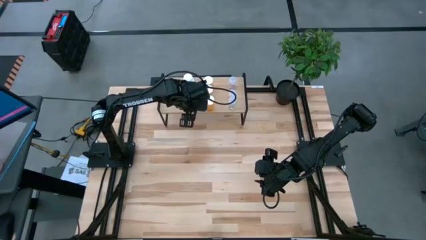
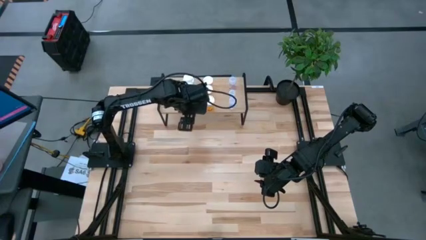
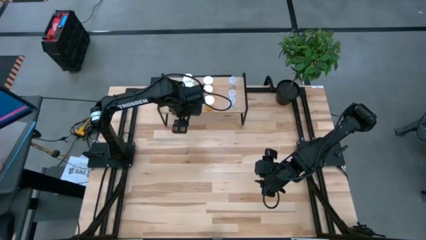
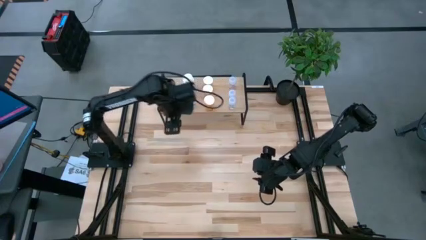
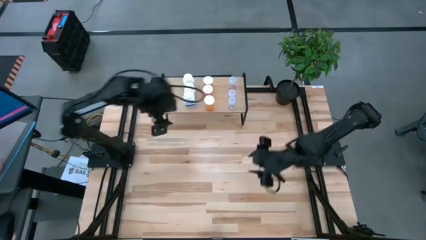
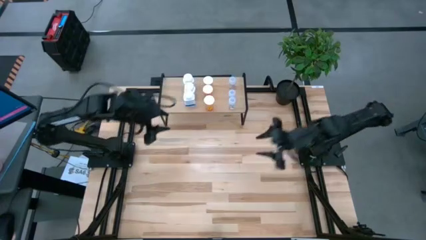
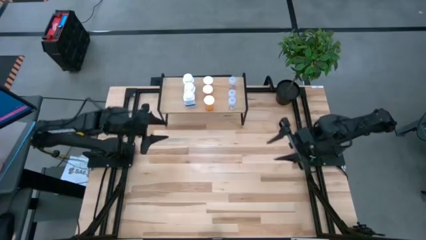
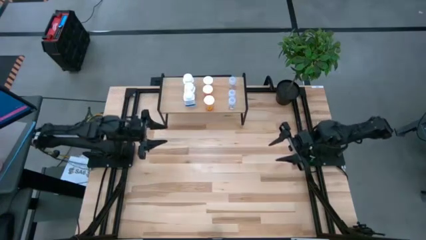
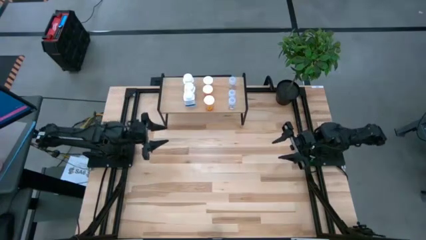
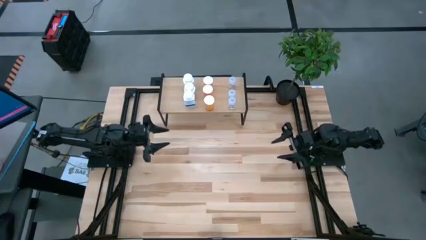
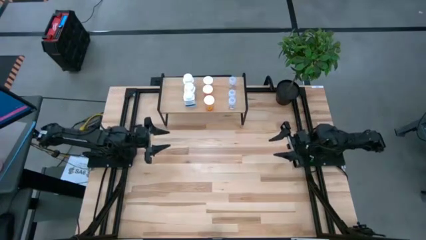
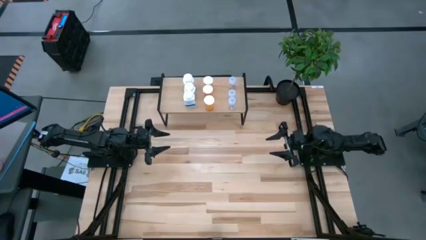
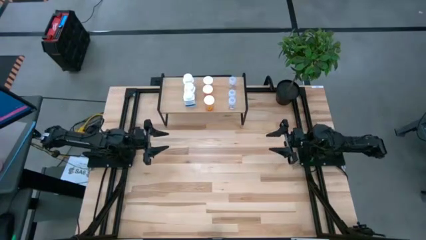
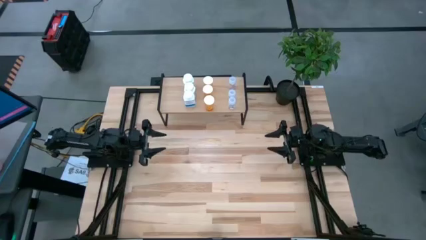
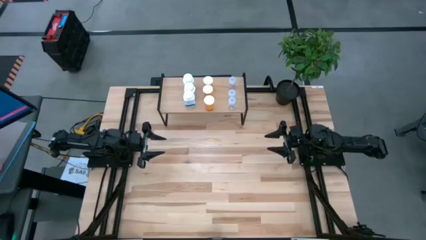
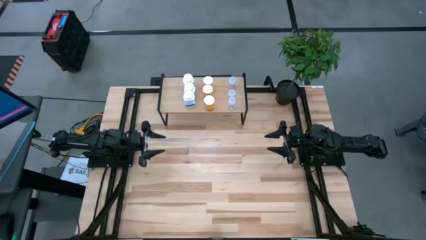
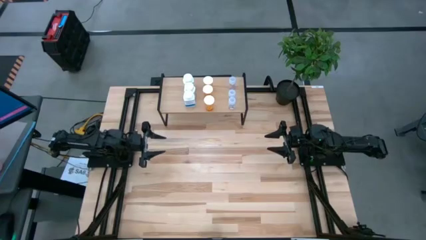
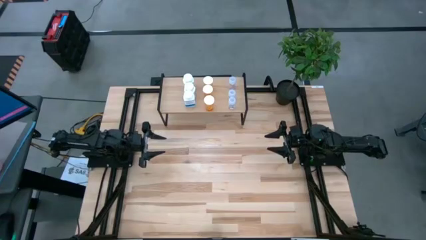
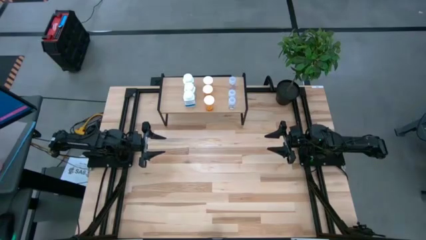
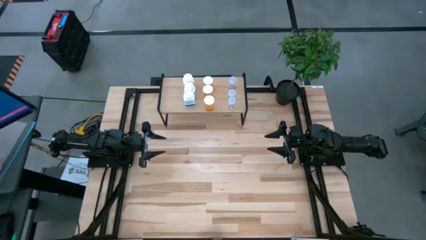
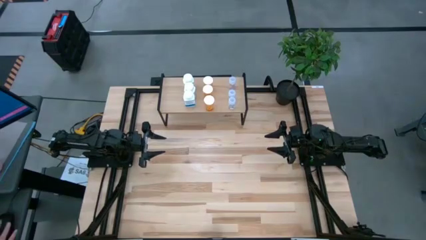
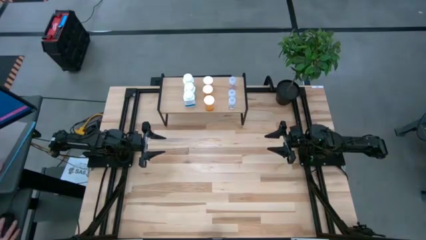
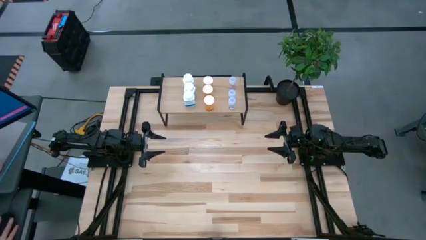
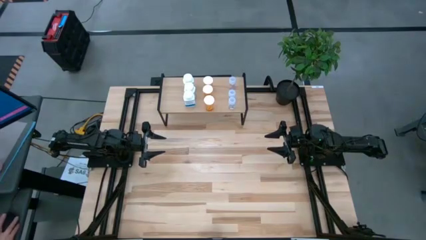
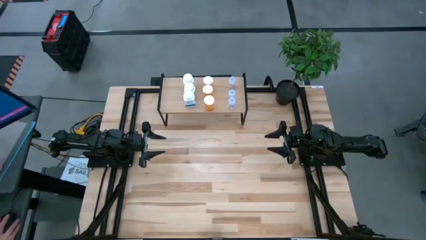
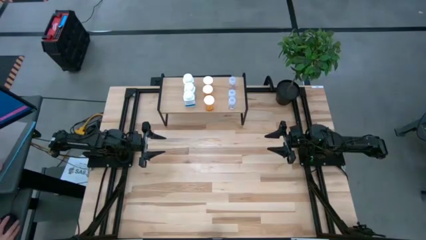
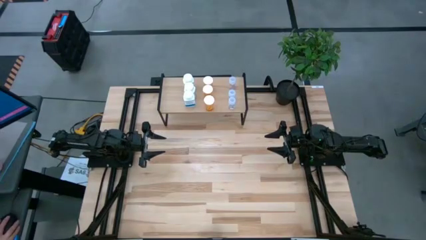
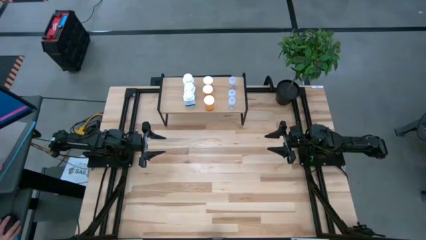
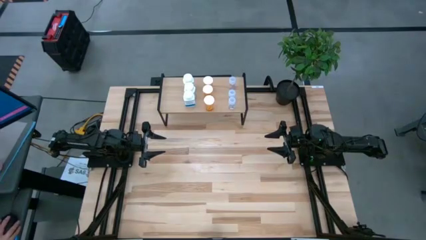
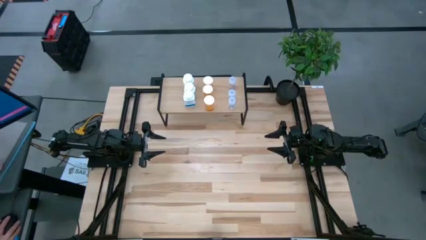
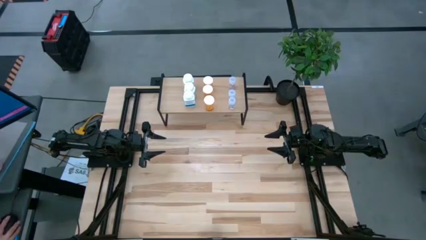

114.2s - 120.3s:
Task: Pick and place medicine bottles onto shelf by color
Return to Home Position

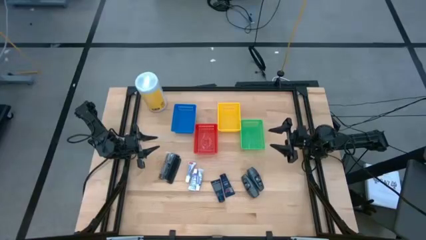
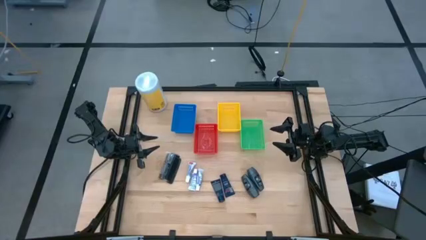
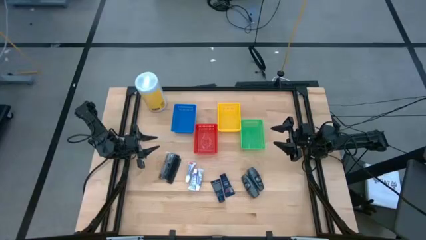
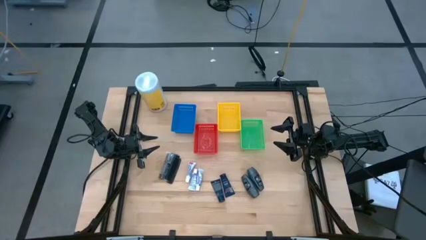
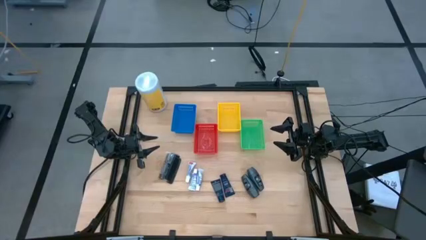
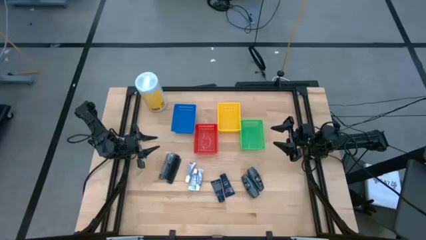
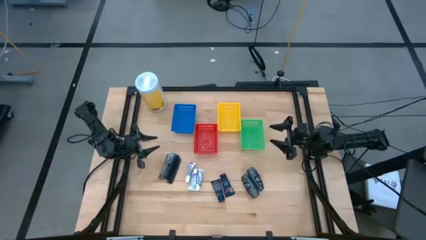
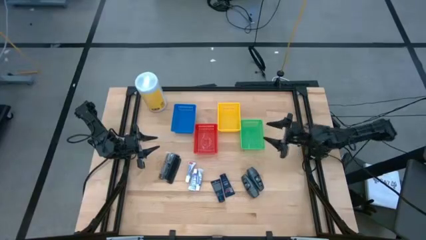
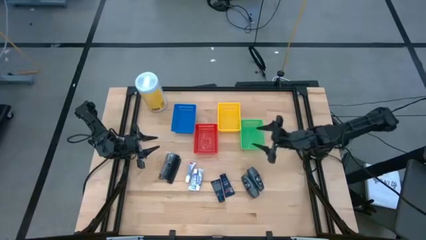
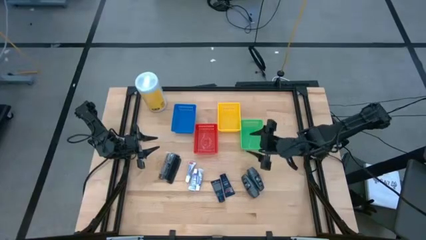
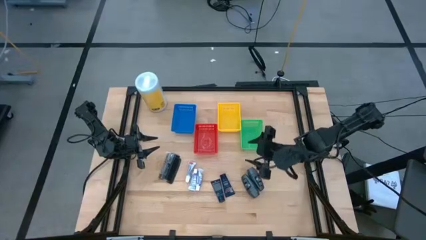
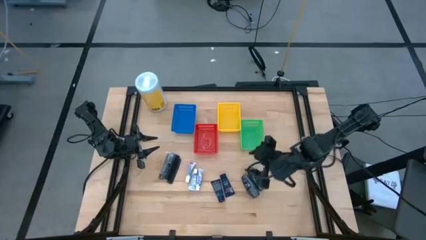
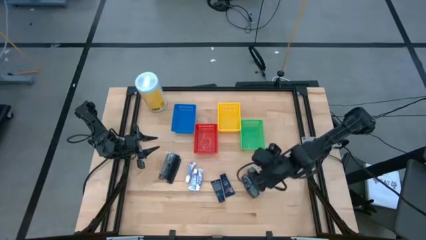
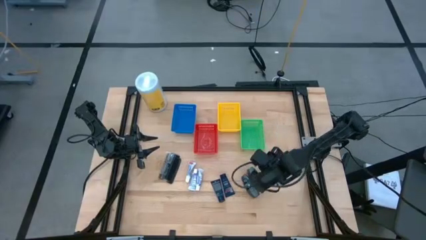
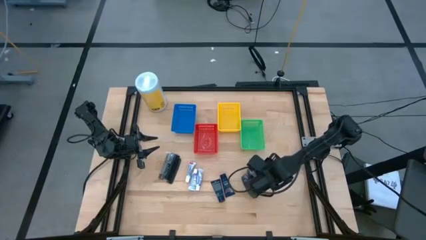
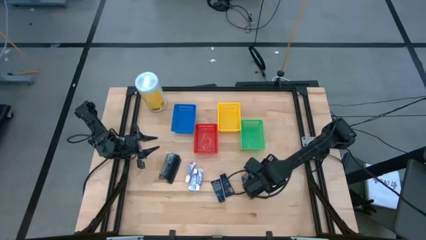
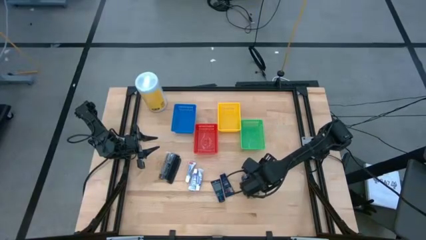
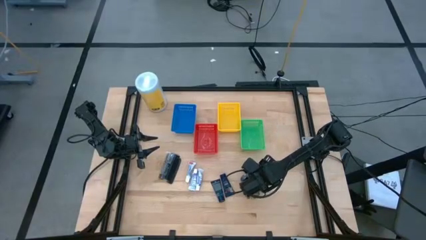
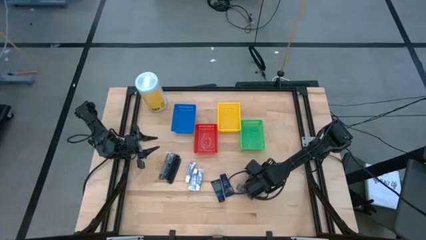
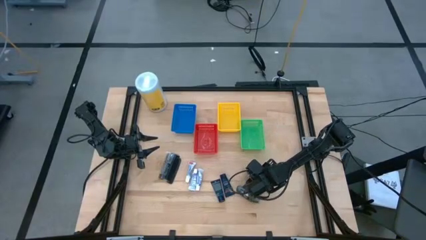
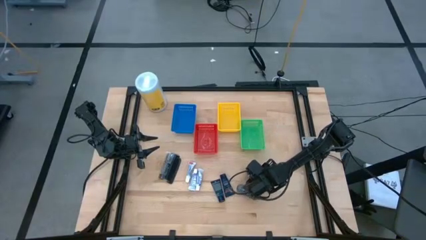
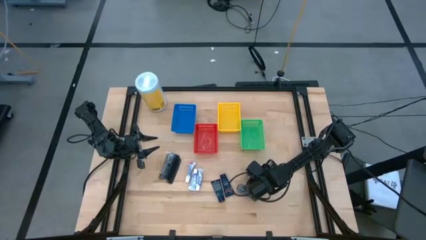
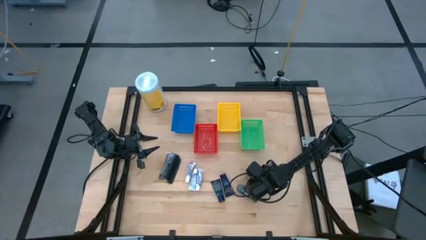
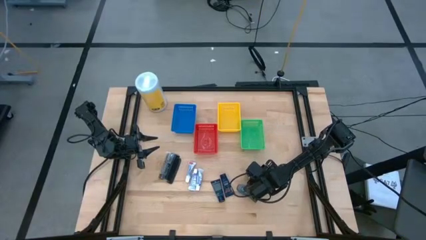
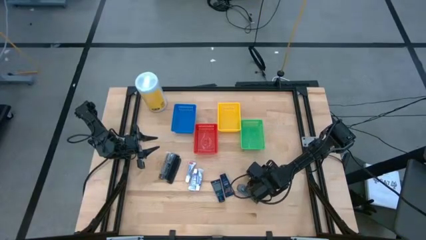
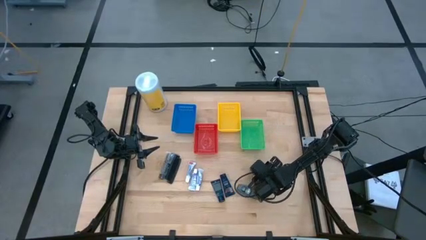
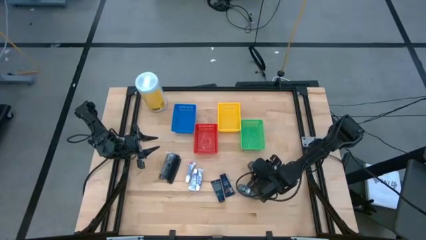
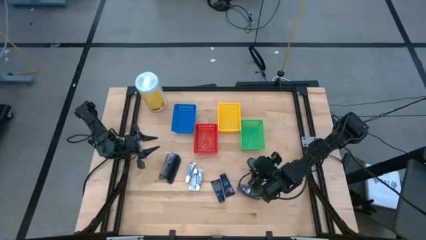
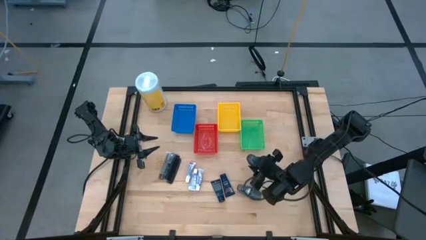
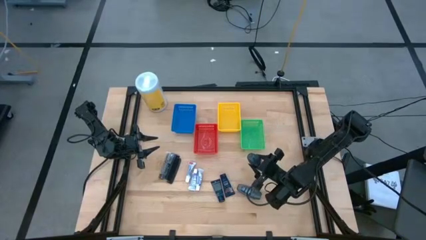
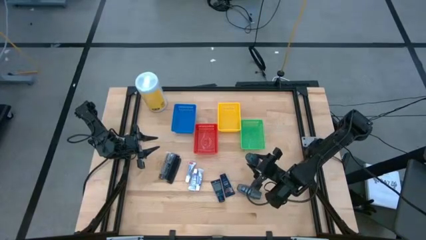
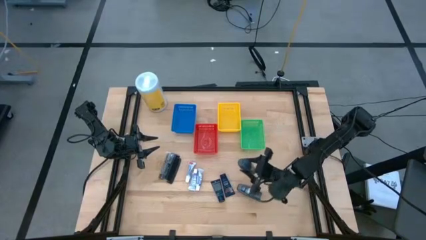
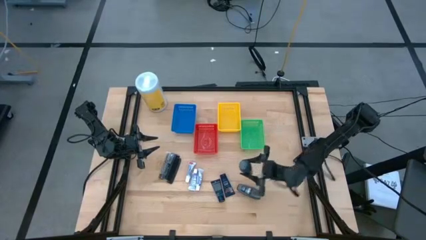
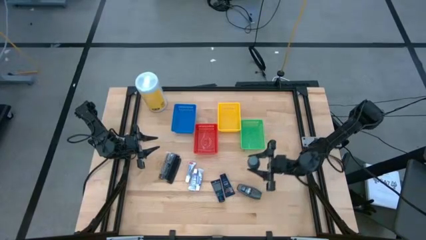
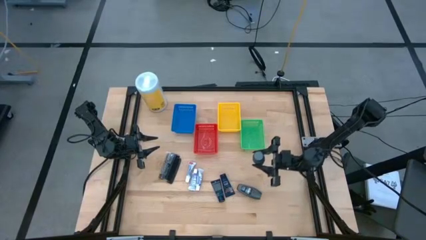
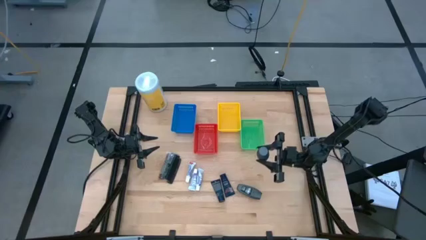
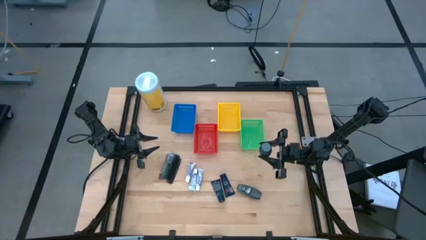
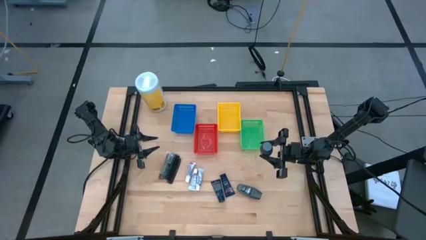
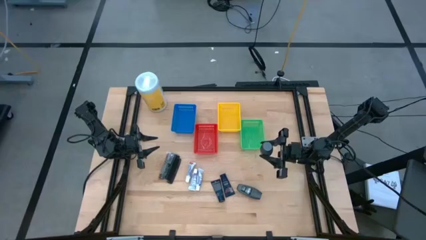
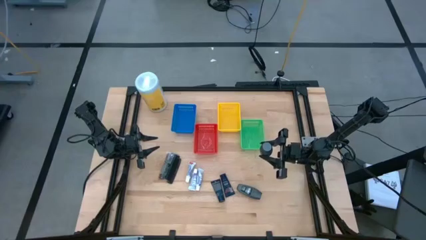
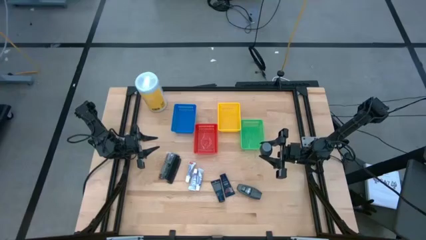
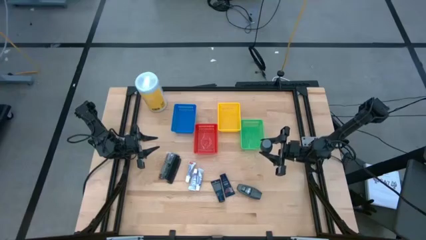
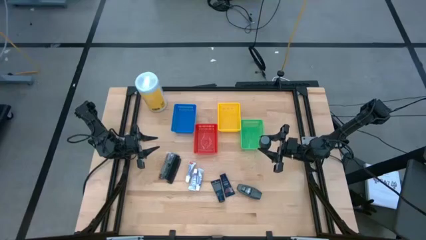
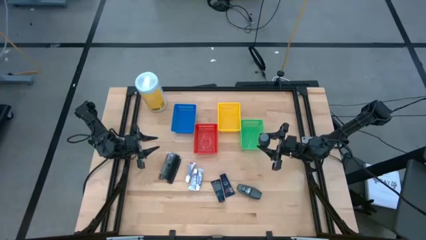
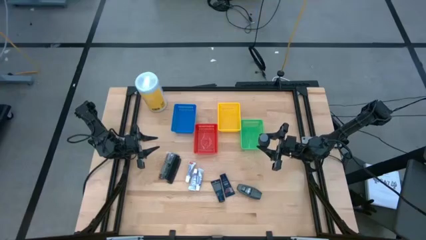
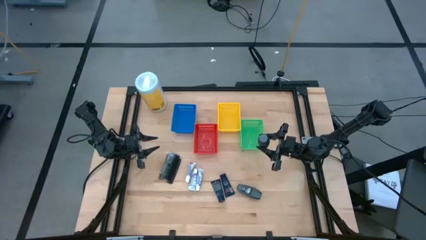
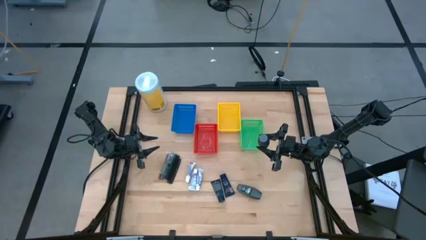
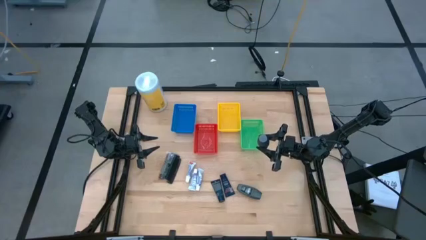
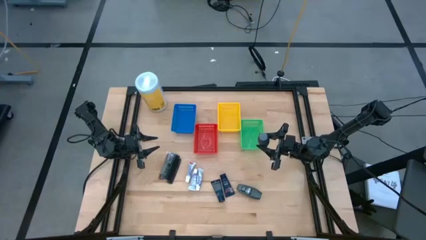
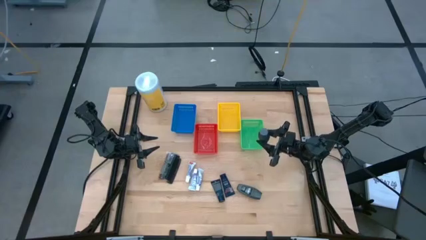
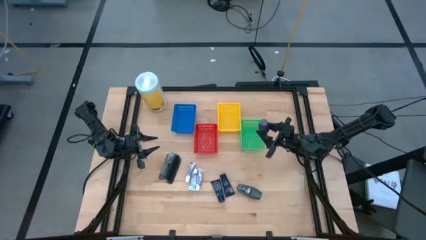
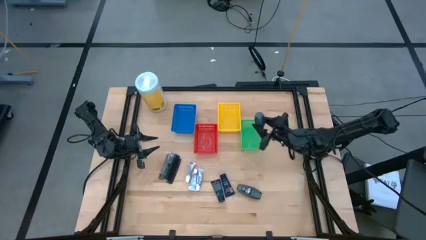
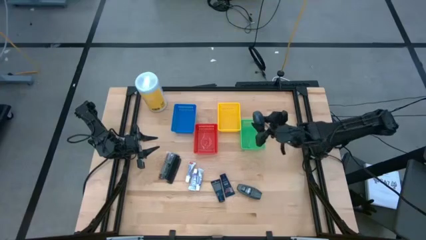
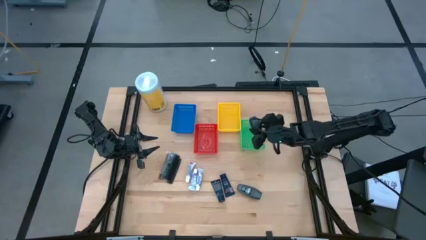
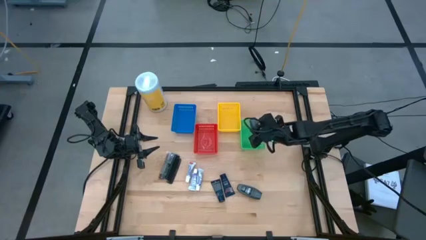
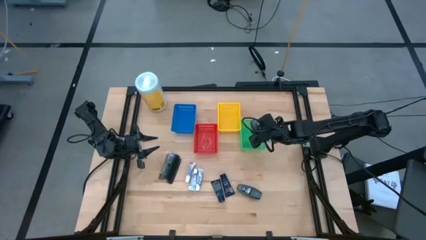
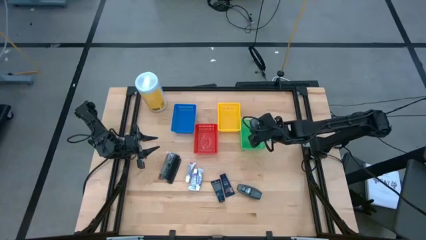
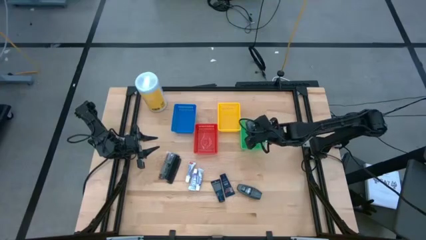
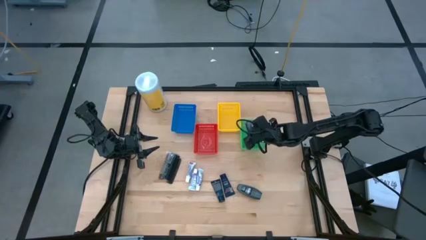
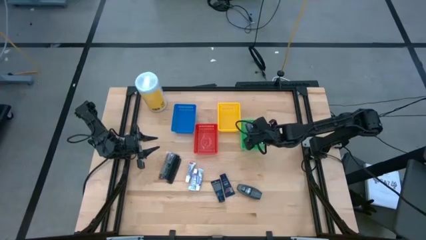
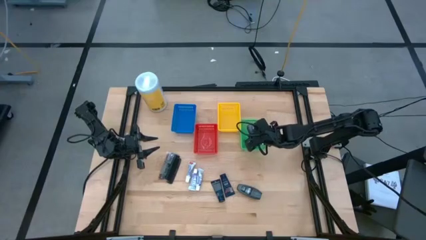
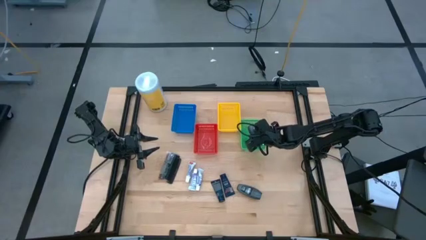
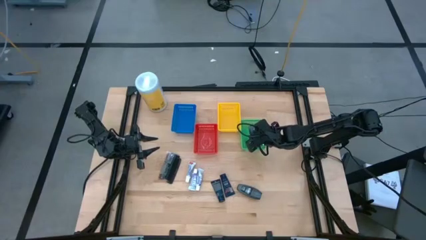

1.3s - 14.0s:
Task: Pick & Place Travel size toiletries
Put the black deodorant into the green bin
